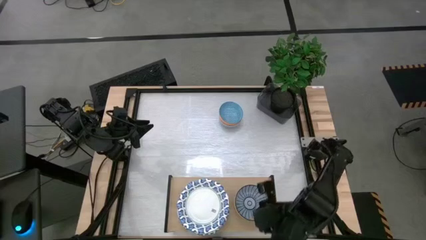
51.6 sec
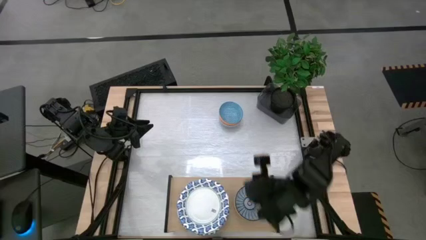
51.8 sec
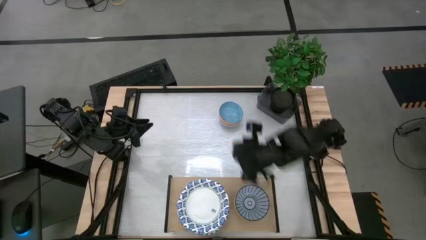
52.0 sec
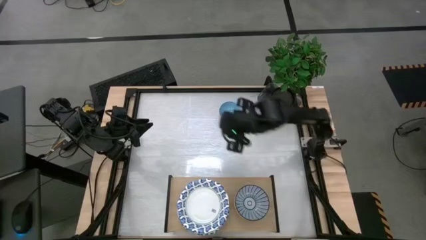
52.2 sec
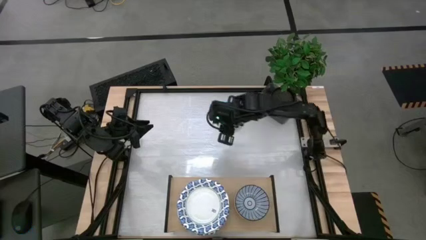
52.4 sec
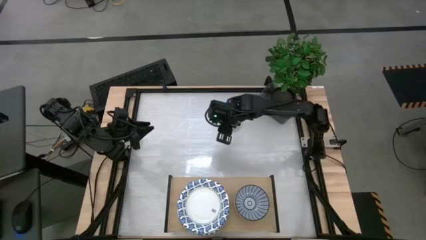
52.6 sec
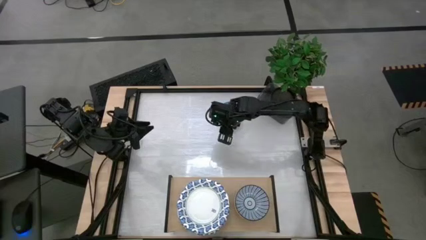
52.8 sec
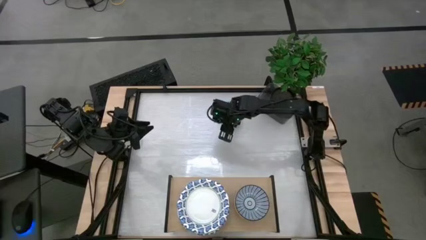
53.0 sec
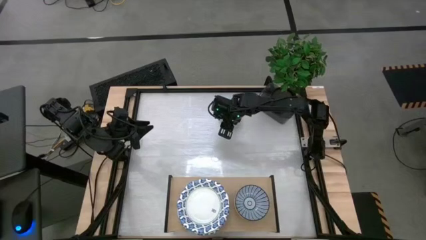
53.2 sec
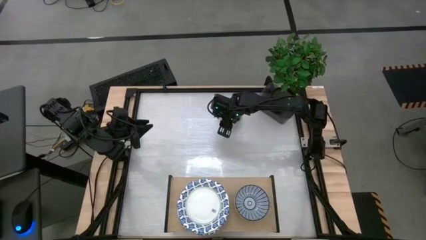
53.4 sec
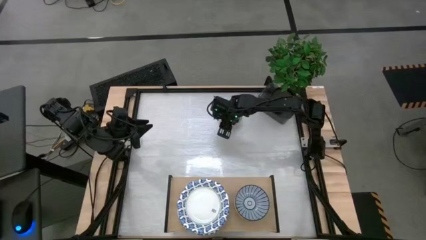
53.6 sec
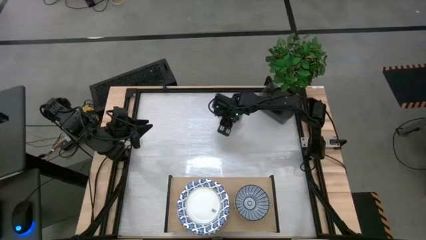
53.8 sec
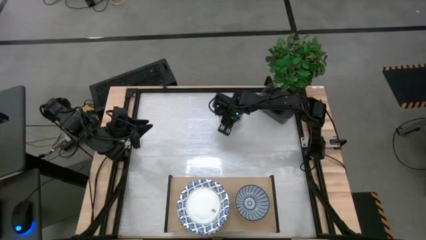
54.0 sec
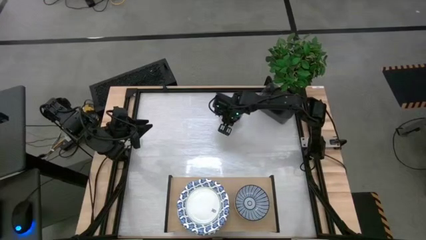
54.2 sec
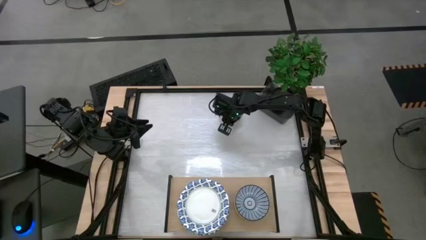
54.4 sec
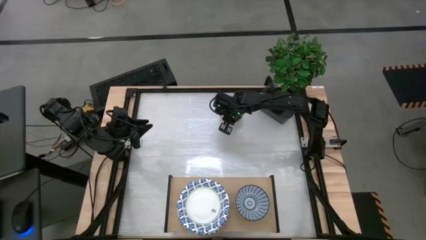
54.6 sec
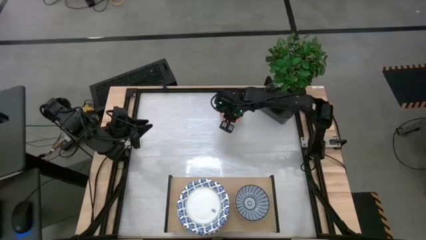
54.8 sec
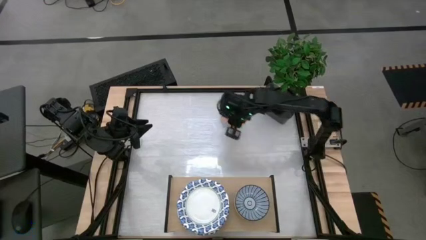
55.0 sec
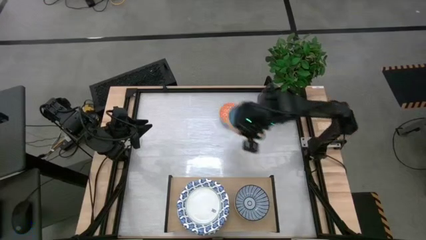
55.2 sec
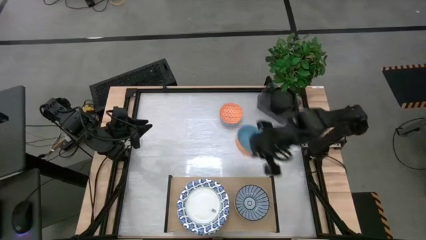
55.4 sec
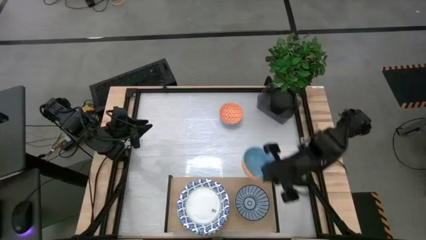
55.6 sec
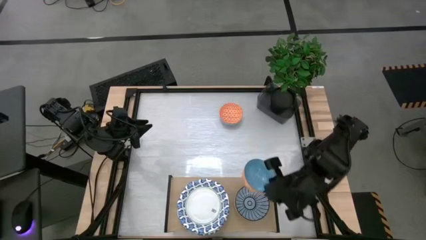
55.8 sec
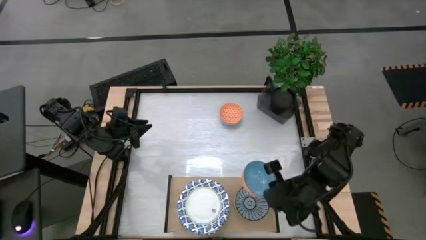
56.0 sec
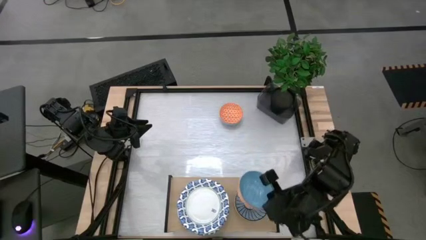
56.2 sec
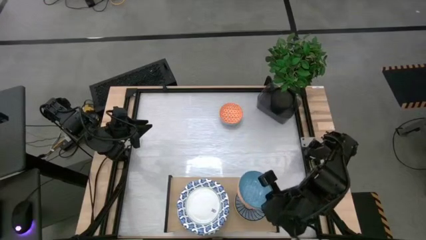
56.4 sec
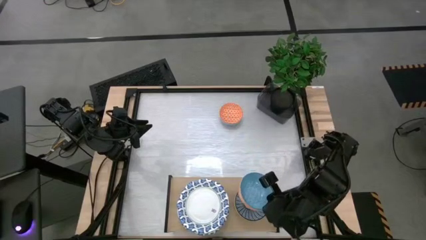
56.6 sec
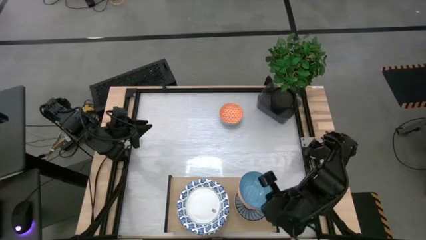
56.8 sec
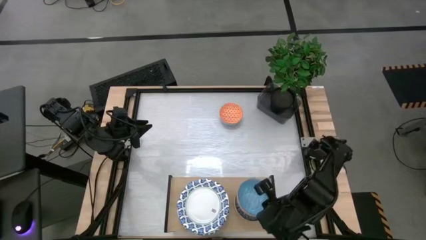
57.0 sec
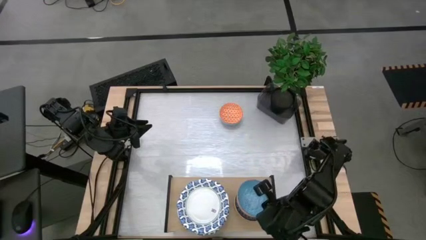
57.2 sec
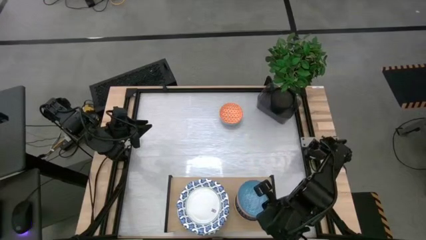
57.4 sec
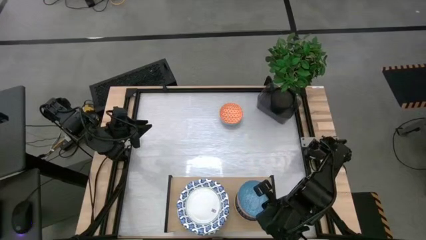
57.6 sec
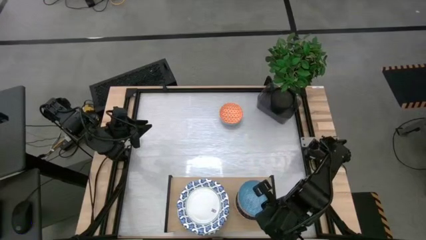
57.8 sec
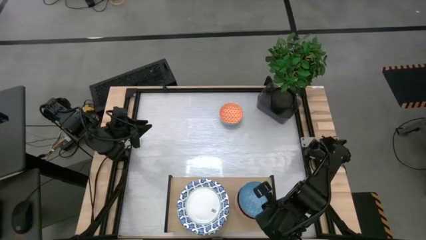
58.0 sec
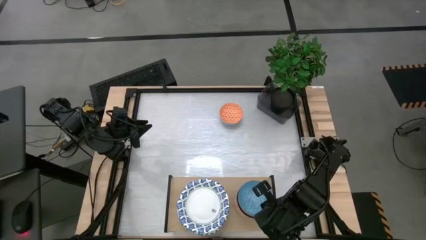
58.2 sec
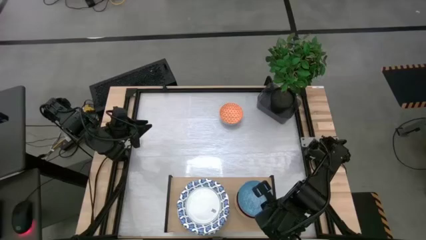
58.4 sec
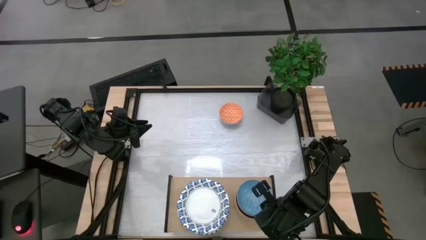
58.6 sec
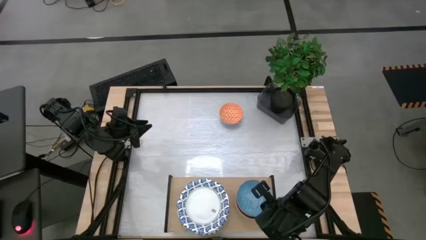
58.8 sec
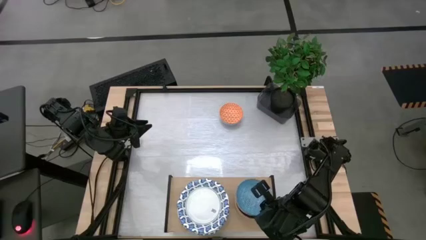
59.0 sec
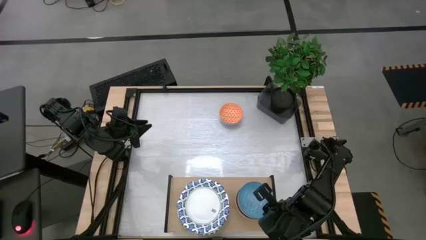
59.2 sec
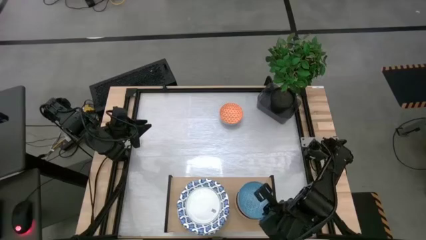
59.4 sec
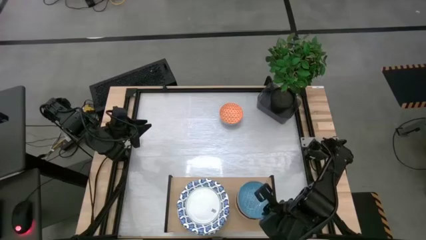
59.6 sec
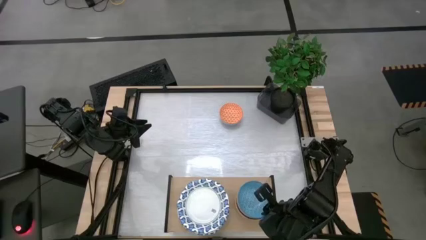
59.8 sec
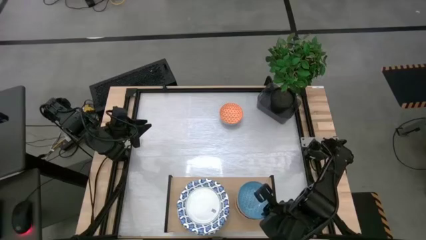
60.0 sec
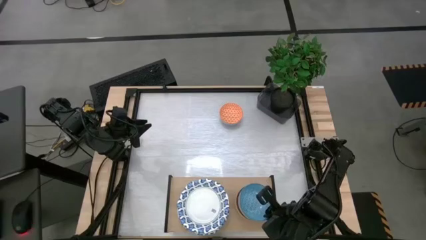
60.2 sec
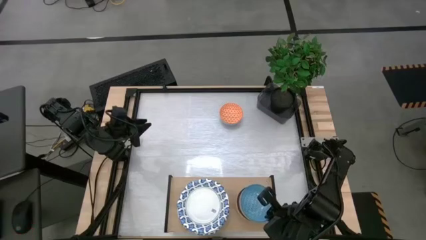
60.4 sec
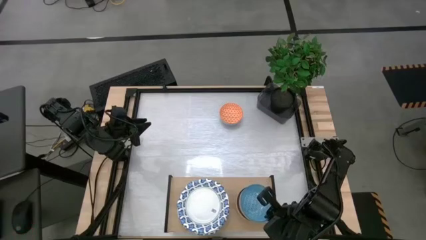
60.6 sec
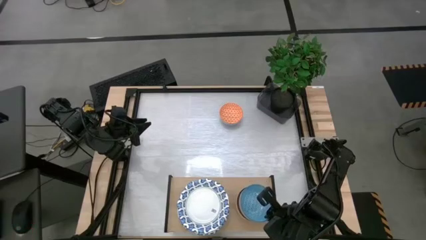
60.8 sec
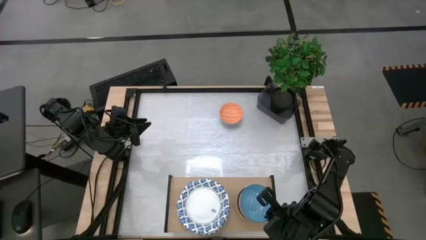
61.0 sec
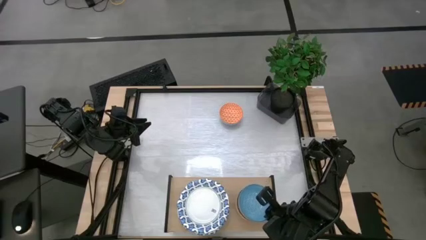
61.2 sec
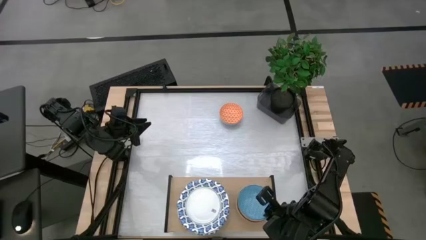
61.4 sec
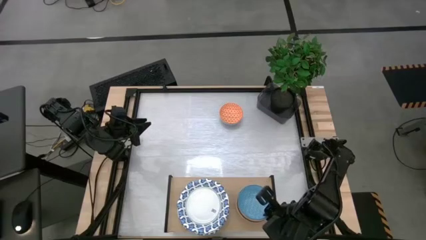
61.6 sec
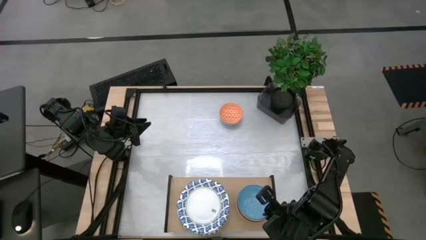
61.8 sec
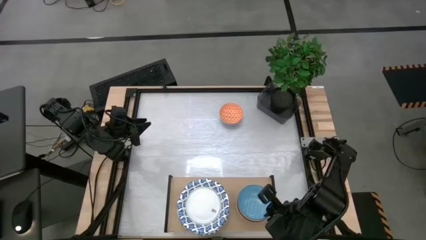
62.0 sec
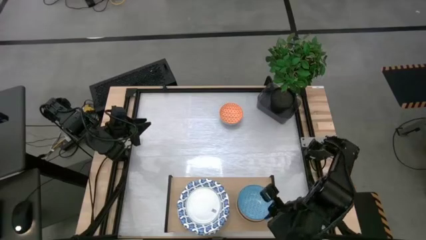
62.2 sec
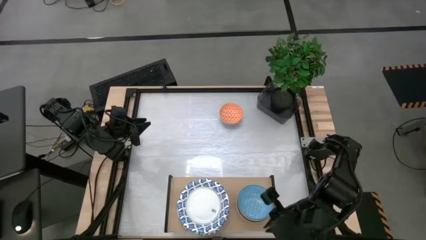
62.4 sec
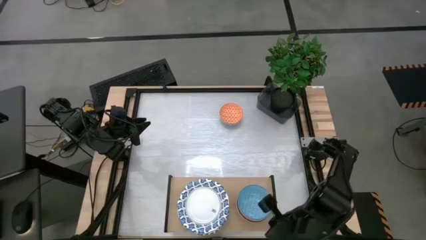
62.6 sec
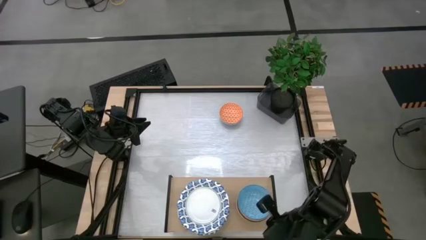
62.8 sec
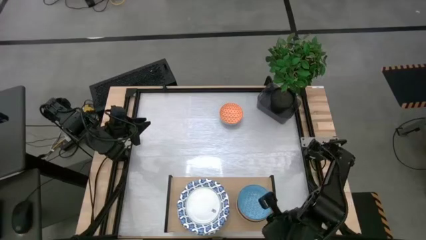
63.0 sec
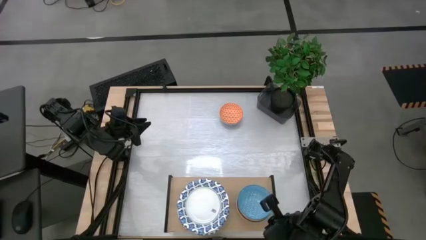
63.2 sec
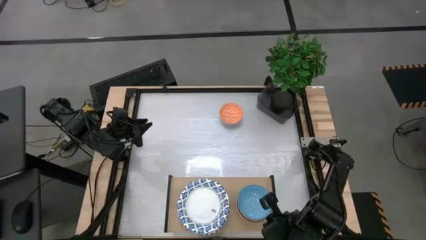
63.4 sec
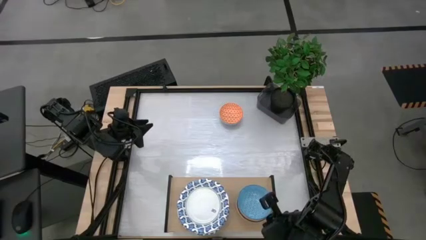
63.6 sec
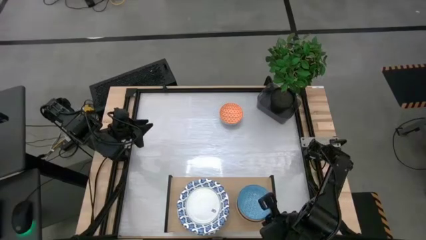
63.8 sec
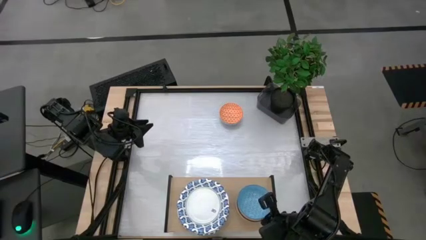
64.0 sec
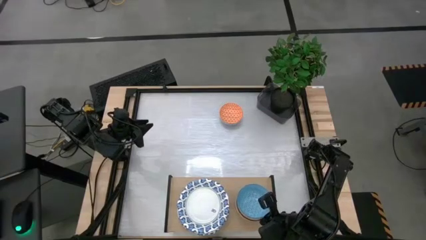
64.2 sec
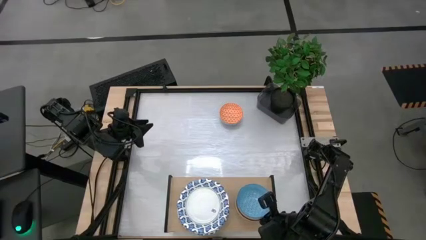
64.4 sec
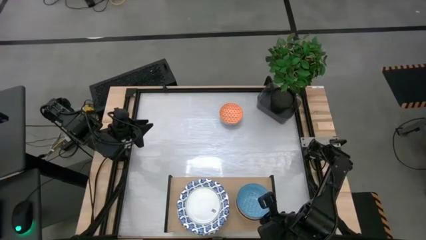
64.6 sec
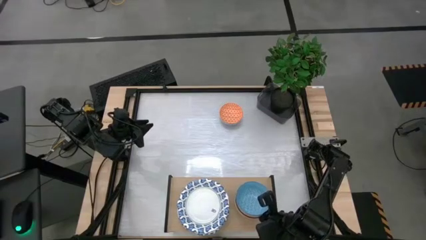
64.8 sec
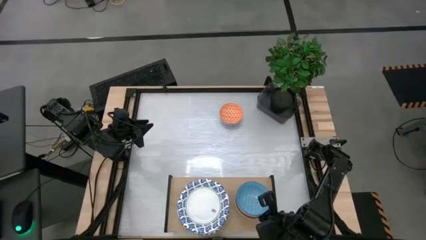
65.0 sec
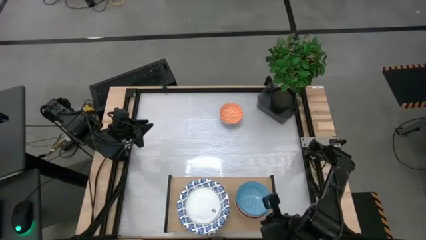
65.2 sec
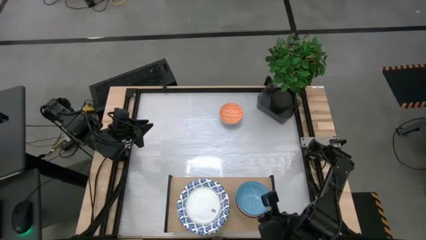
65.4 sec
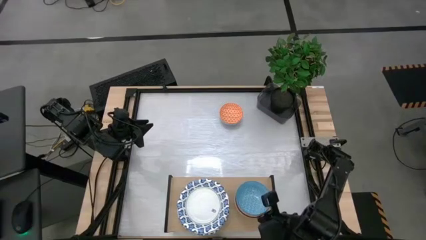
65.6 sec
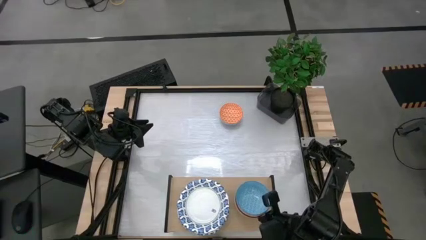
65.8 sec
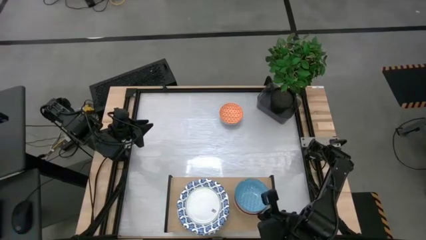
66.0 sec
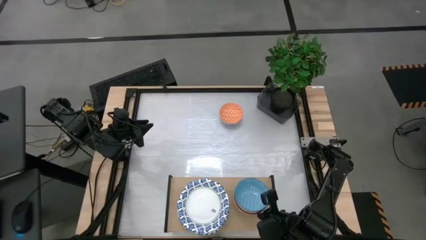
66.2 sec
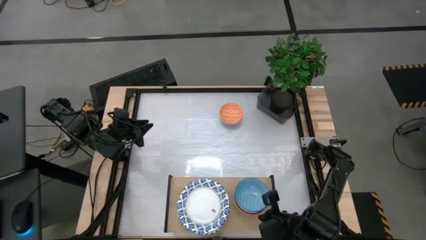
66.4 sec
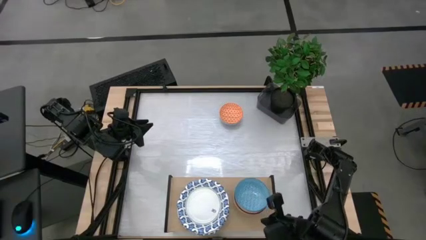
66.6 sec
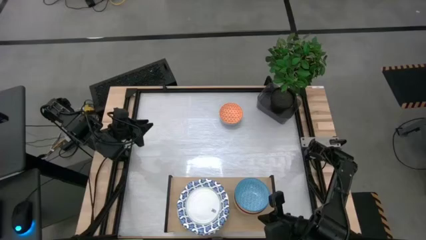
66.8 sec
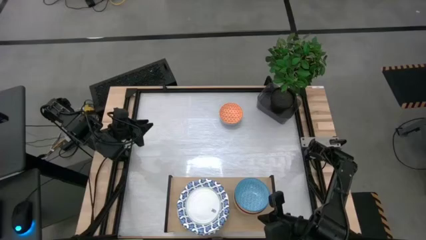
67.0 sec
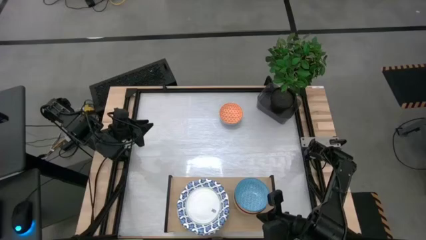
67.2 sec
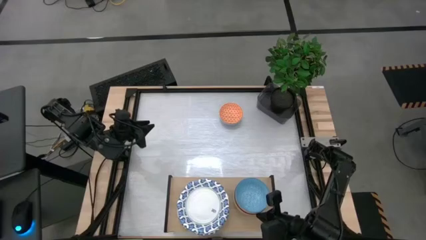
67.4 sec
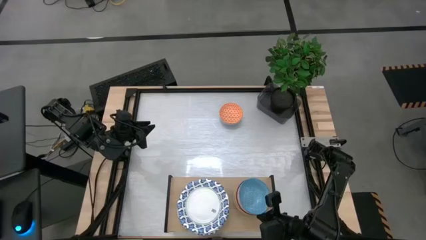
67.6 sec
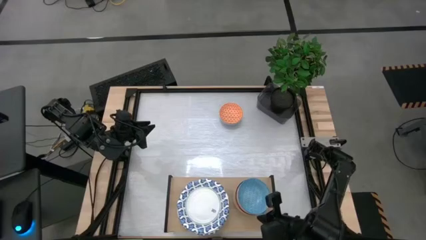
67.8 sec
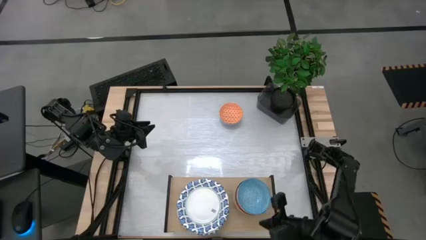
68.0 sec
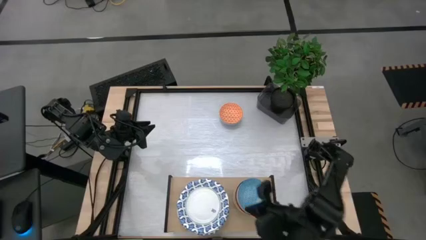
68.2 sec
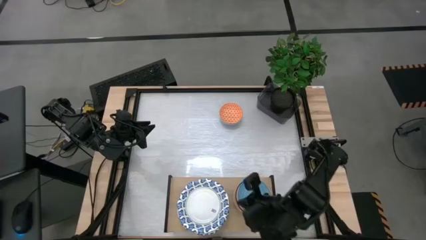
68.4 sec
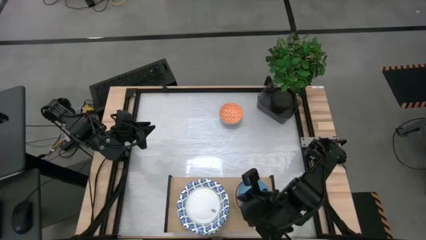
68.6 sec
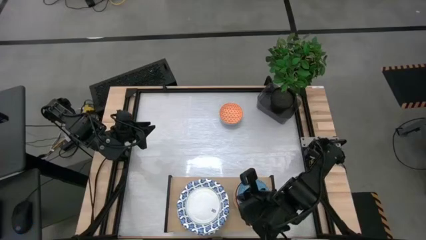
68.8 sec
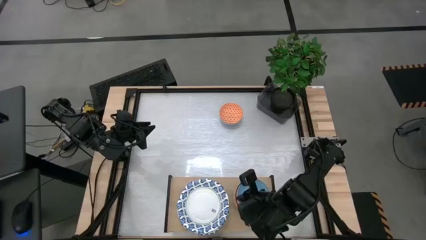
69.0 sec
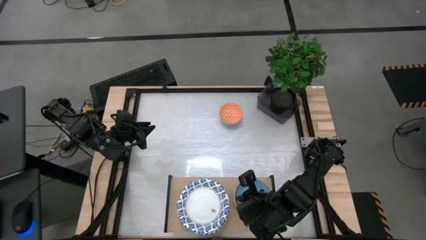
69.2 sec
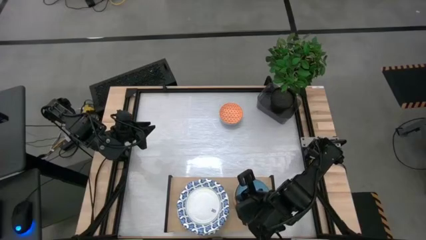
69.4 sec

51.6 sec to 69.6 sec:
Task: Place and stack plates onto a shelf
Stack the light blue bowl on top of the blue bowl on the shelf
